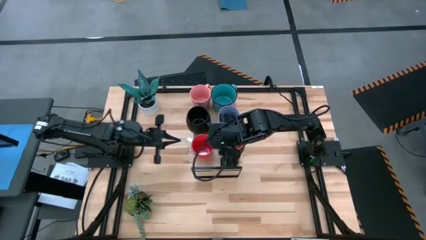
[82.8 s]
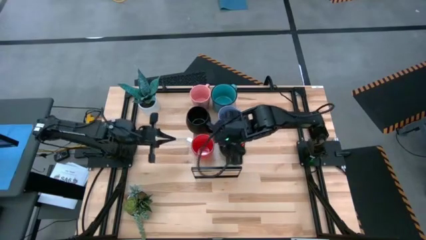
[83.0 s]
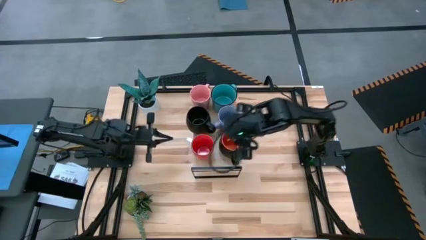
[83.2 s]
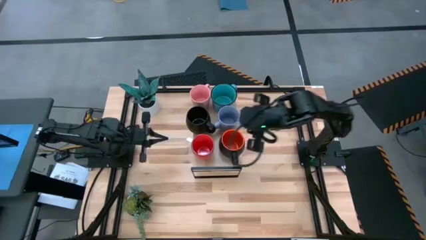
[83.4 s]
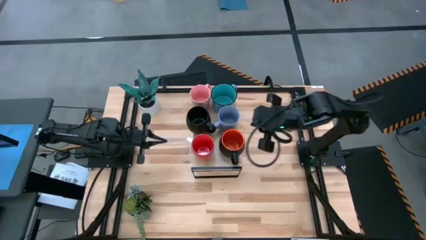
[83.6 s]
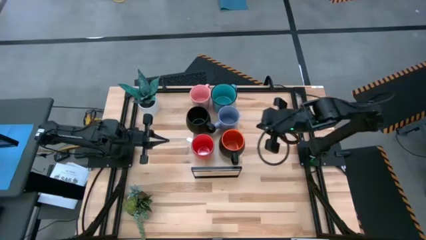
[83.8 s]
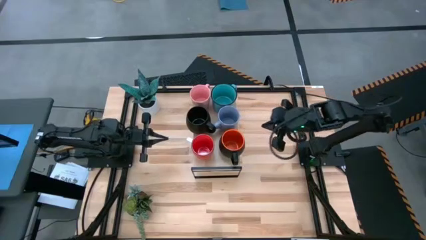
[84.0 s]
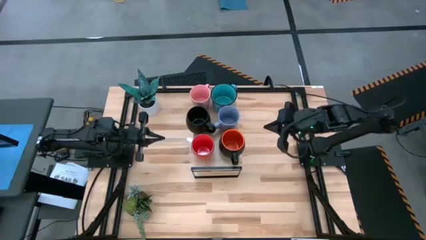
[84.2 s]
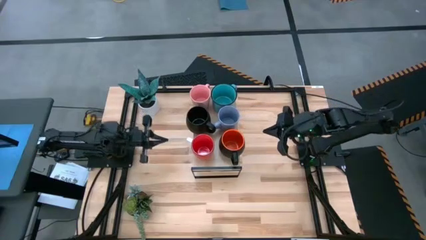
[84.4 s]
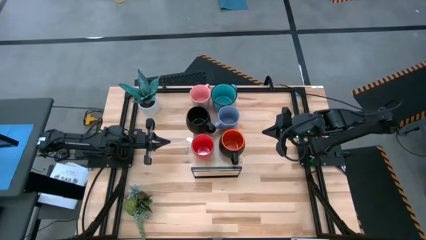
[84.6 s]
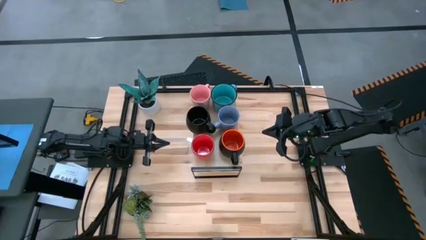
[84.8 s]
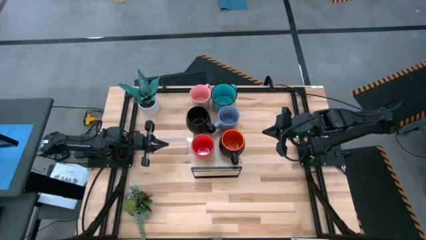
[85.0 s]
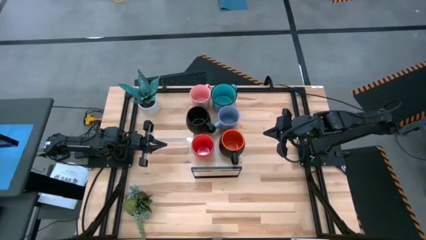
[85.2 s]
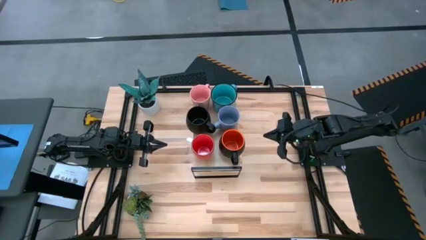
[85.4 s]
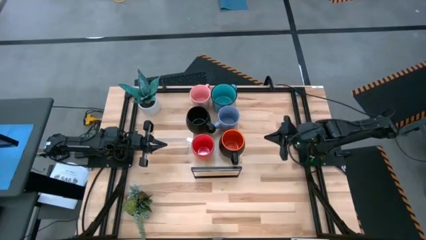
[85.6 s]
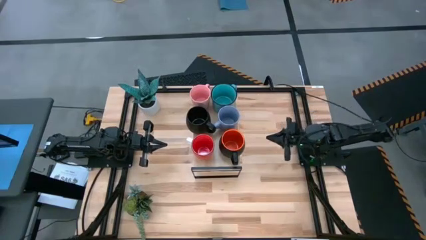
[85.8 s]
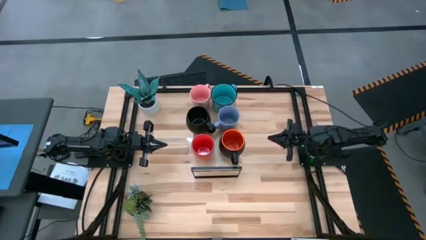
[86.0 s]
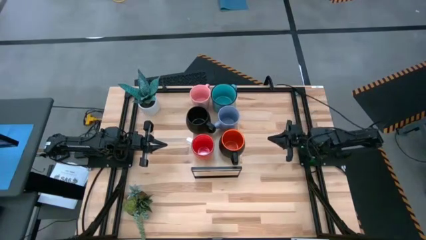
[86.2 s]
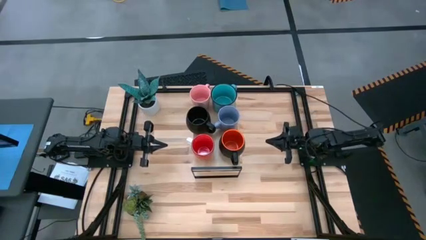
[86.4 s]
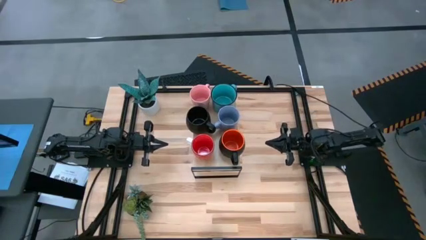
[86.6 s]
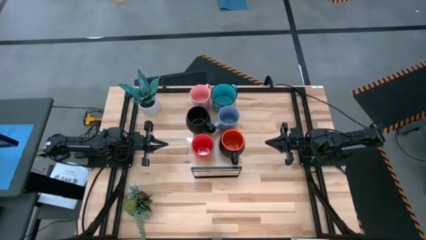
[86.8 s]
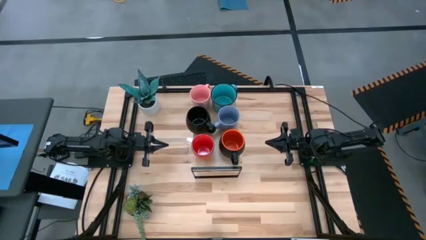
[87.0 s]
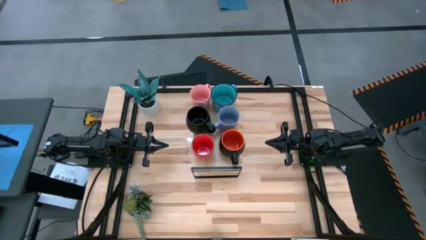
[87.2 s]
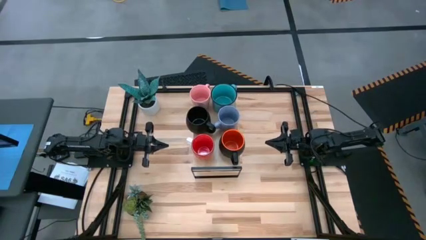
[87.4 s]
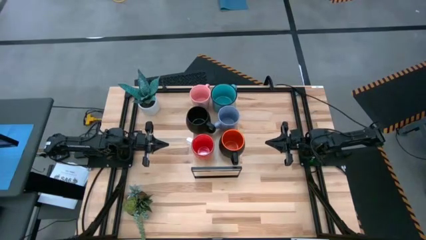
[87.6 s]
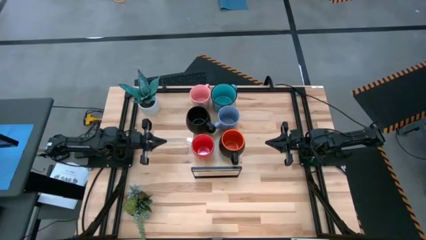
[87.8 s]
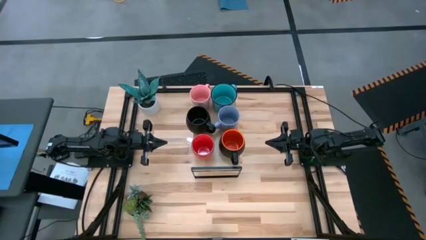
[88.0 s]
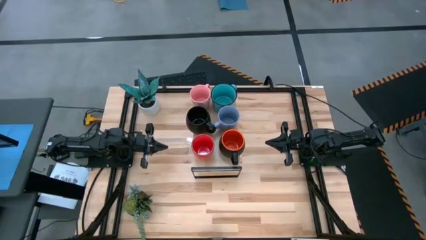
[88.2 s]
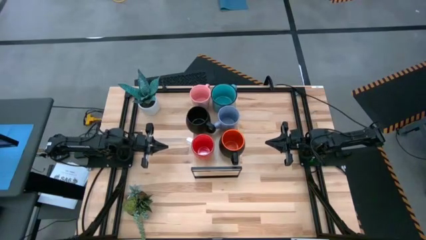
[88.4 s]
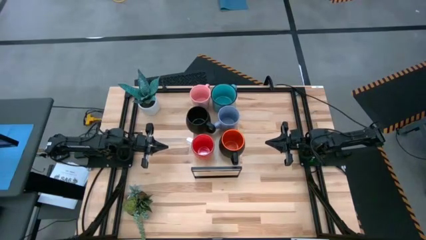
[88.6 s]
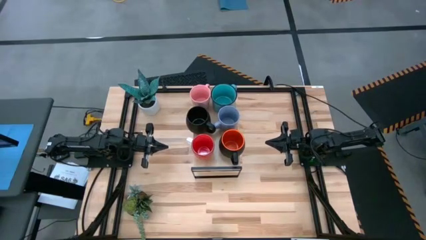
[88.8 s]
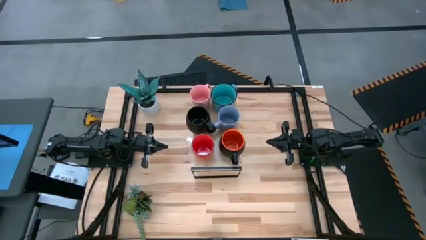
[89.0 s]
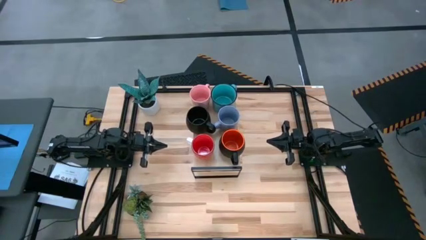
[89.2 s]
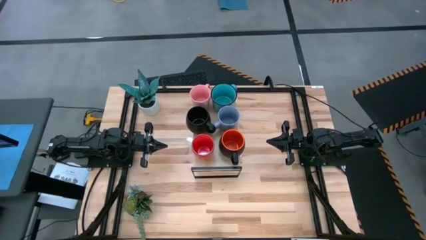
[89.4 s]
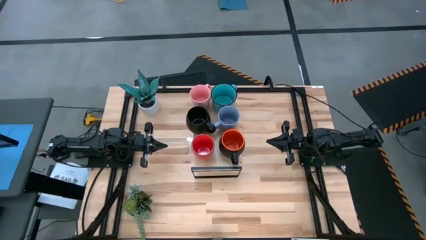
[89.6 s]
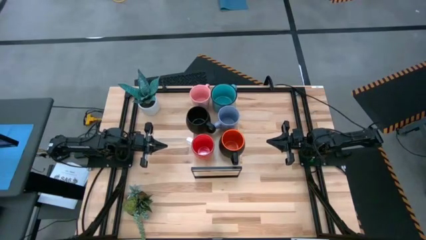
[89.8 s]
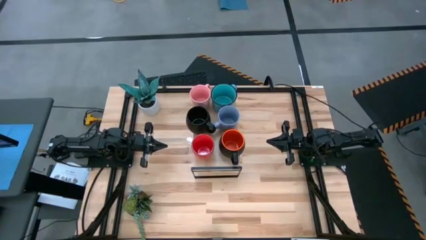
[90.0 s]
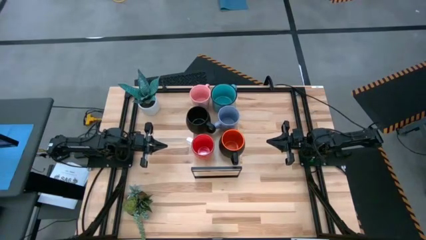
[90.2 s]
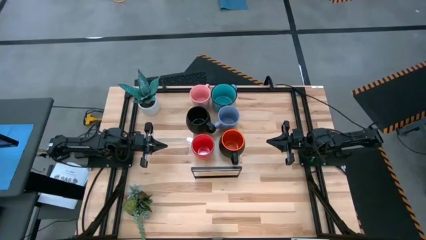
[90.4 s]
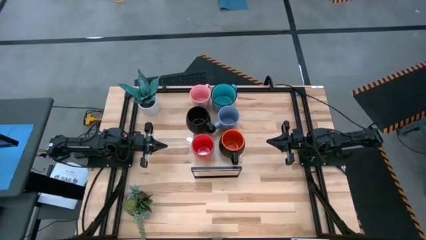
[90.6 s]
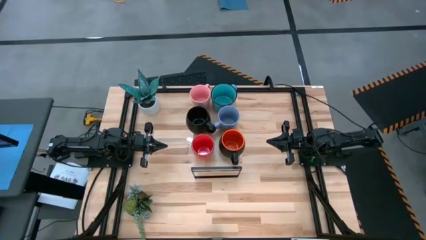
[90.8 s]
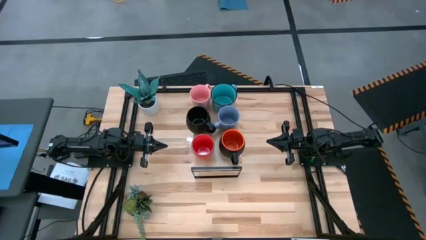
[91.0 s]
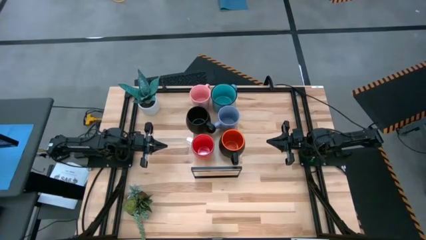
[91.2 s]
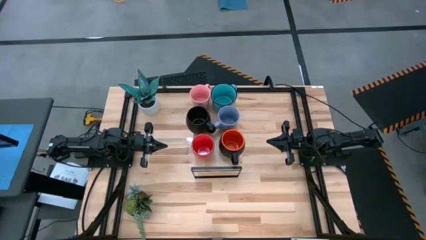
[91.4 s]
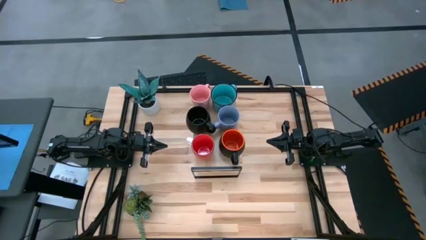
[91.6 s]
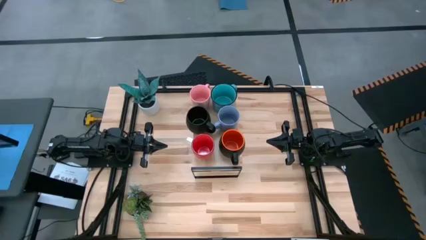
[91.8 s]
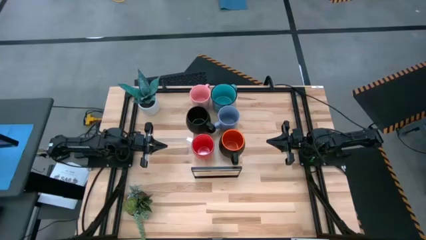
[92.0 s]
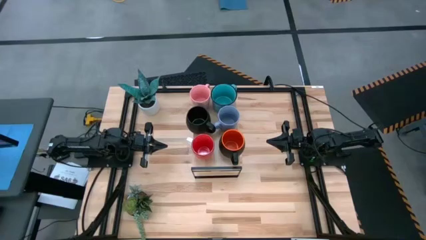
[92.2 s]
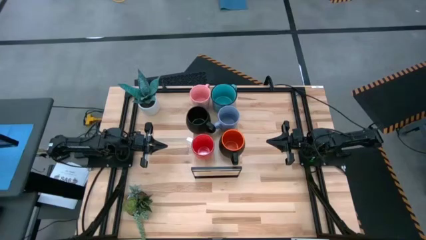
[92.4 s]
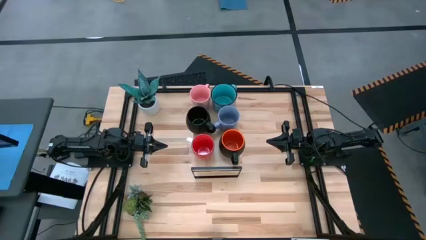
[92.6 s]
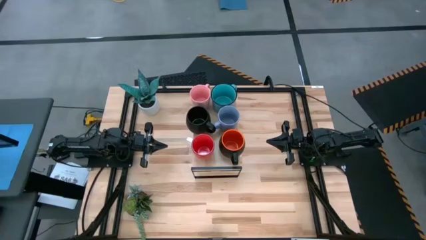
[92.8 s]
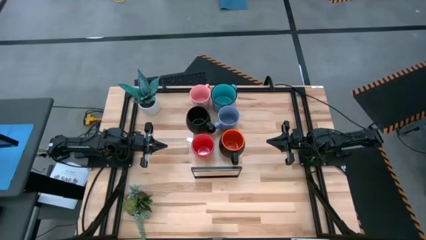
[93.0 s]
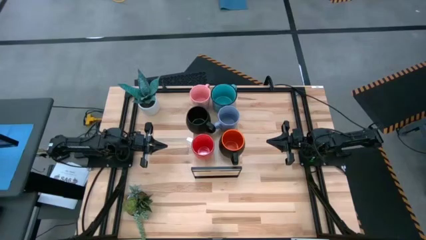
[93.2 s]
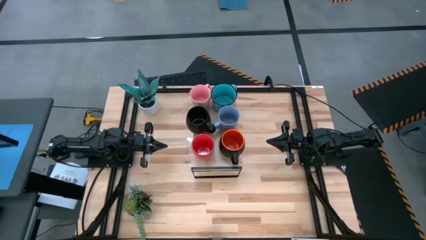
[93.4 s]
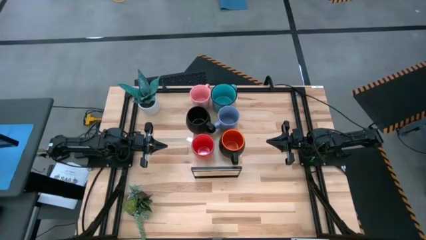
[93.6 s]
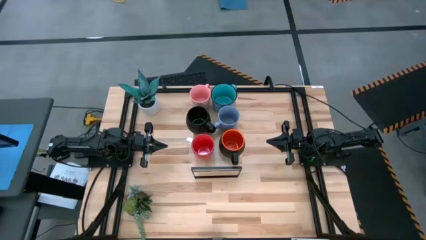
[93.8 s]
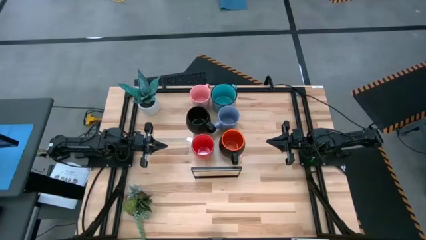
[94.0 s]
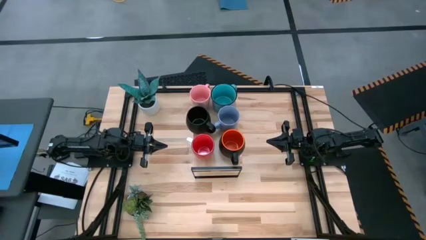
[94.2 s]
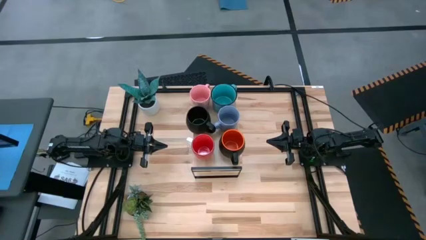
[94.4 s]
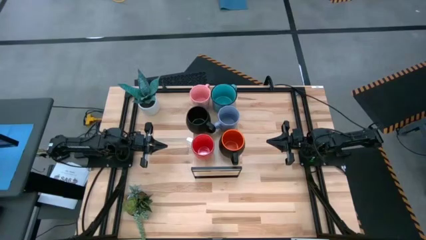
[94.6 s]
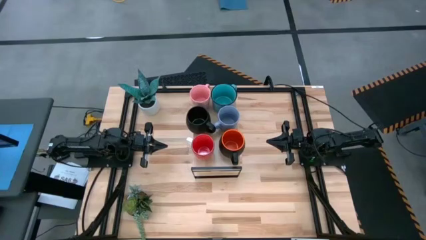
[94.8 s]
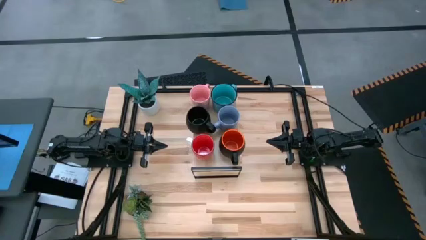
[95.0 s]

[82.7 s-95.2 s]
Task: Place coffee mugs
Return to Home Position
